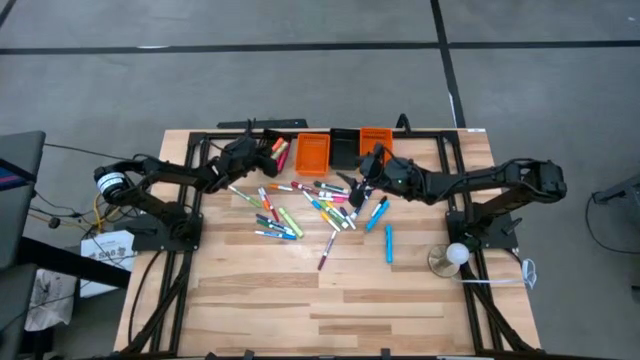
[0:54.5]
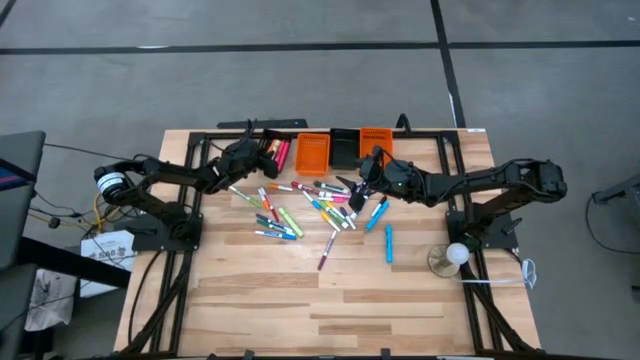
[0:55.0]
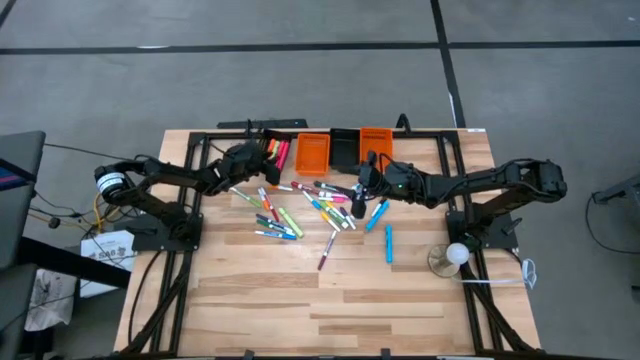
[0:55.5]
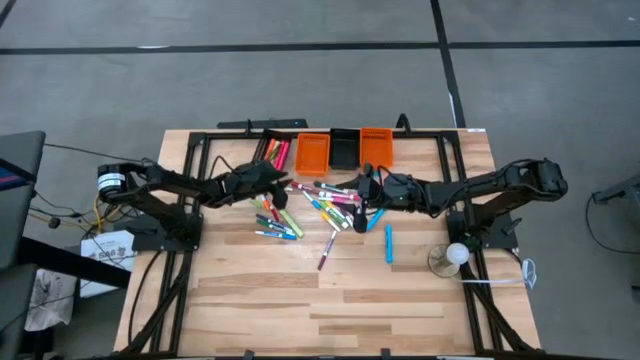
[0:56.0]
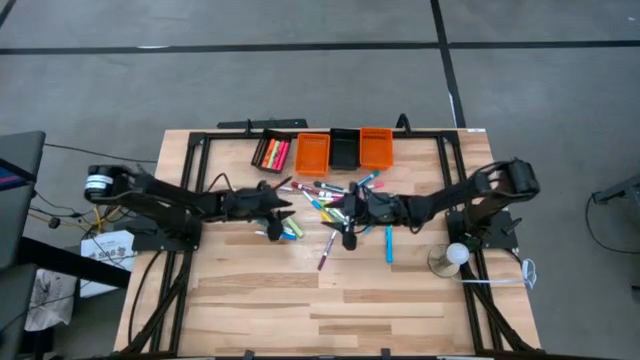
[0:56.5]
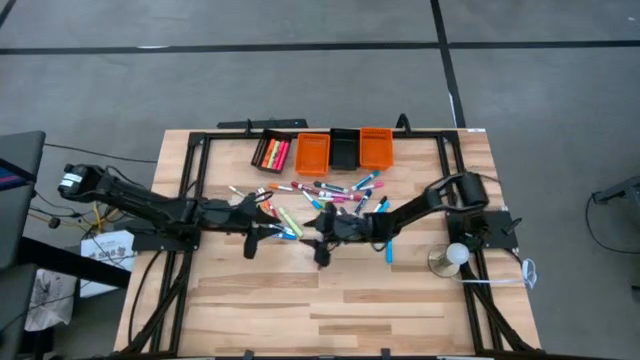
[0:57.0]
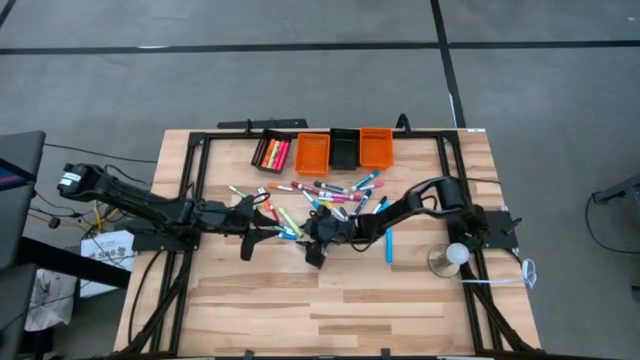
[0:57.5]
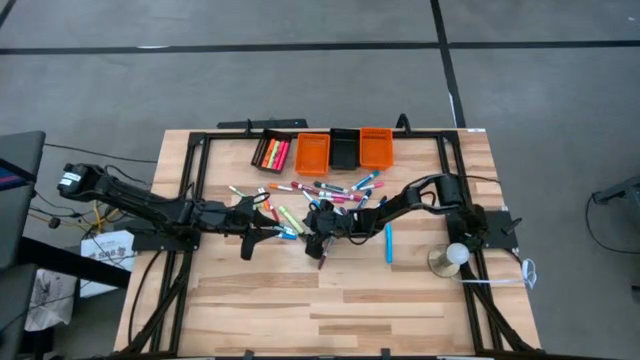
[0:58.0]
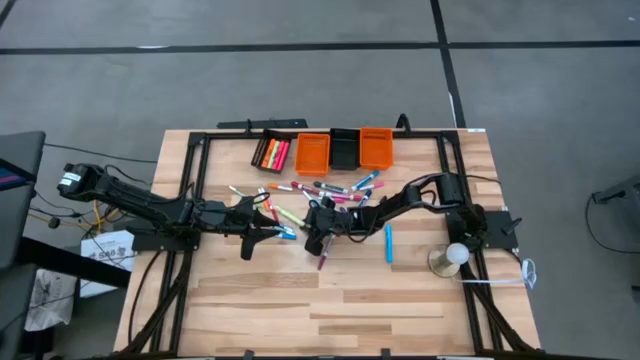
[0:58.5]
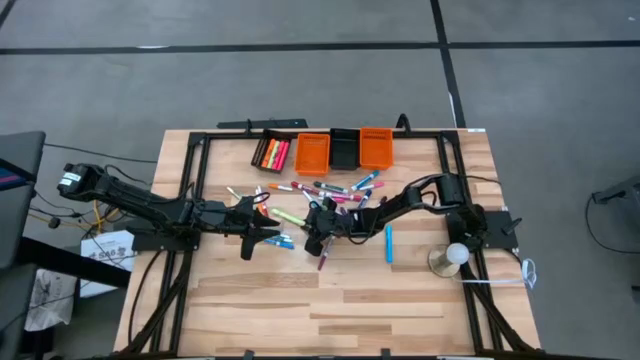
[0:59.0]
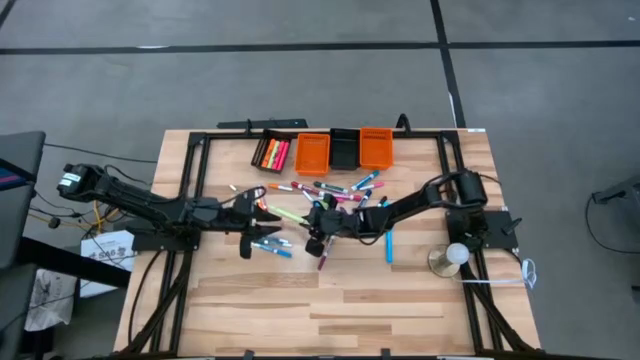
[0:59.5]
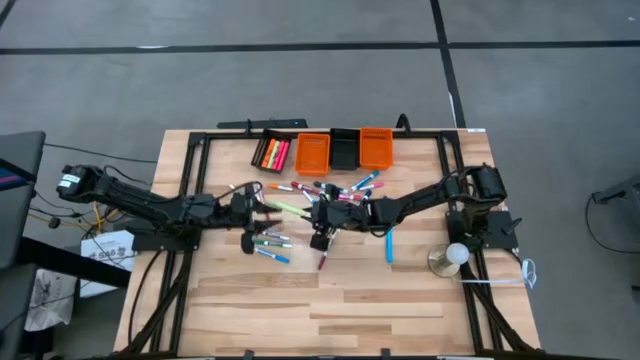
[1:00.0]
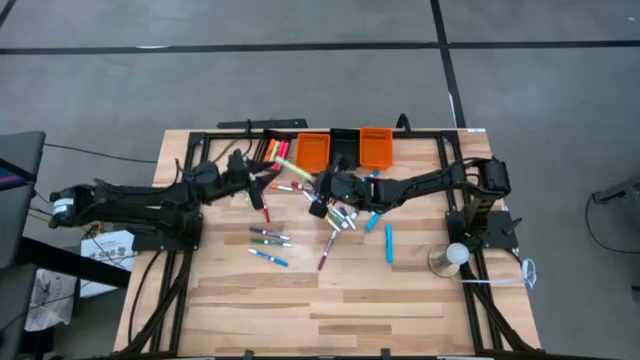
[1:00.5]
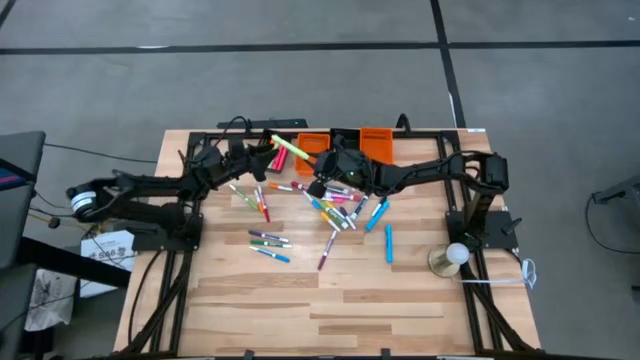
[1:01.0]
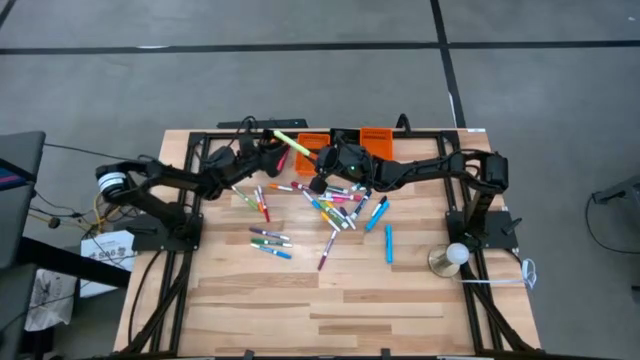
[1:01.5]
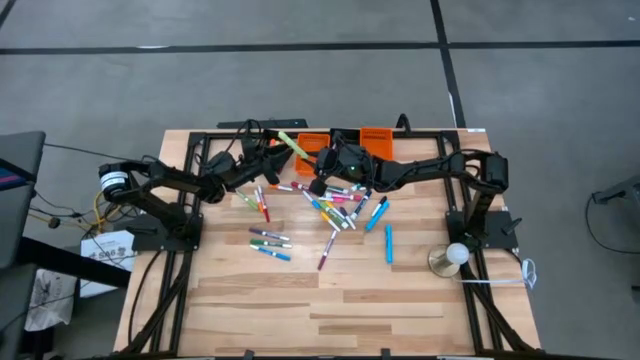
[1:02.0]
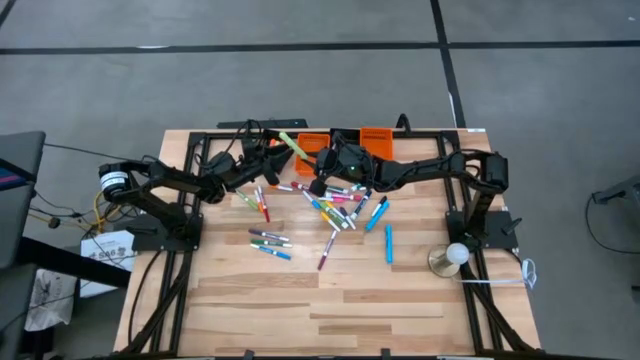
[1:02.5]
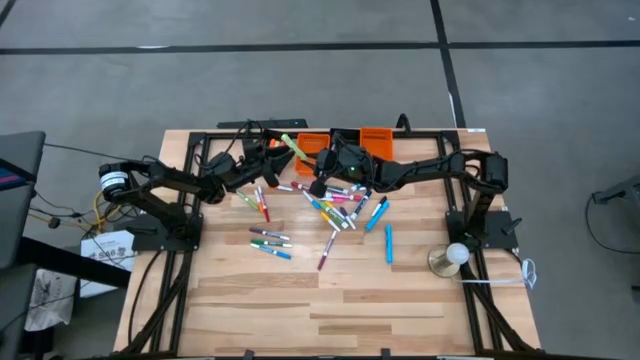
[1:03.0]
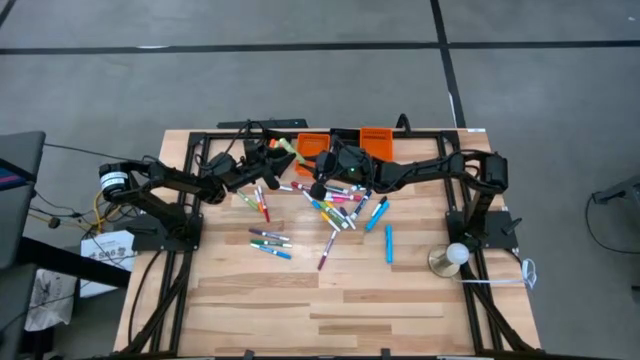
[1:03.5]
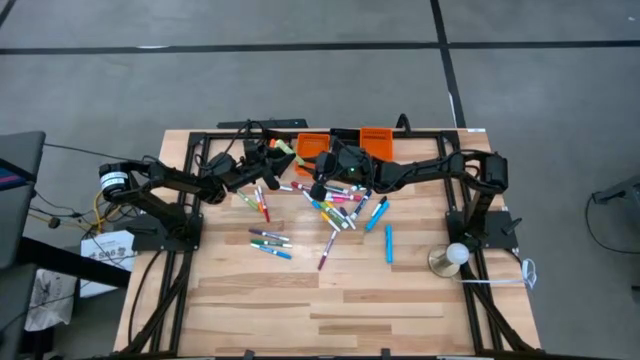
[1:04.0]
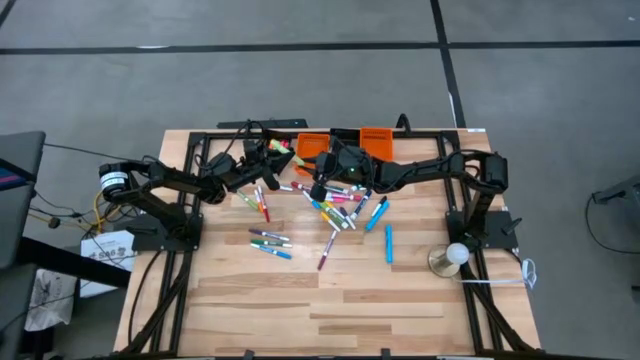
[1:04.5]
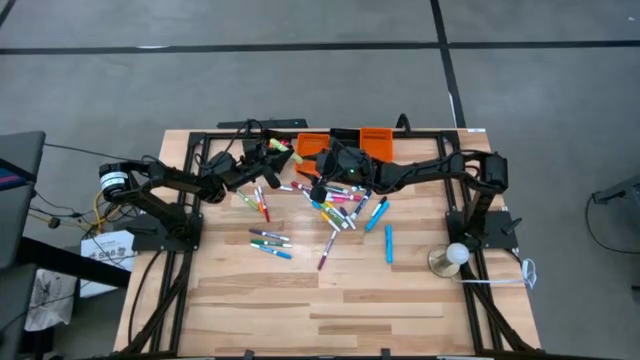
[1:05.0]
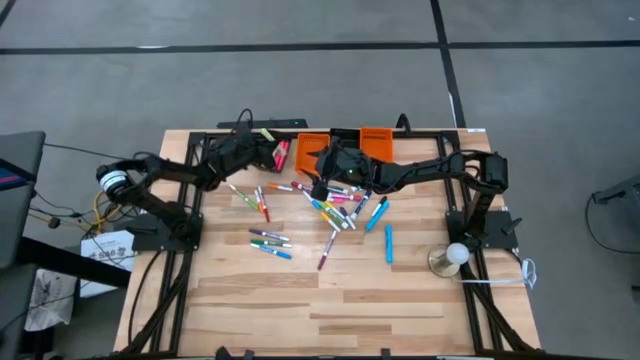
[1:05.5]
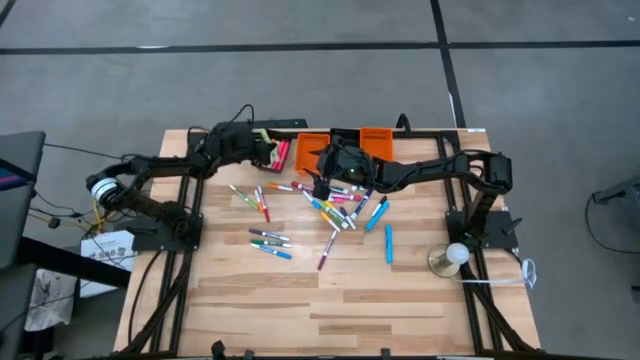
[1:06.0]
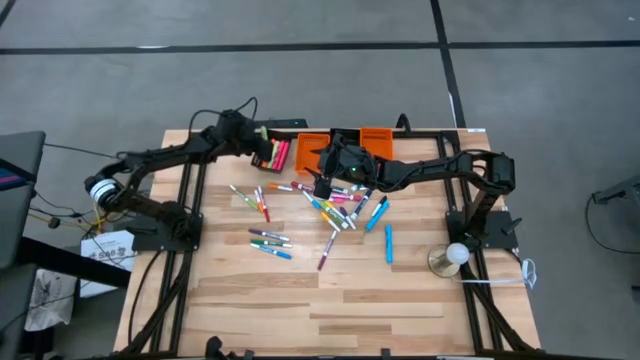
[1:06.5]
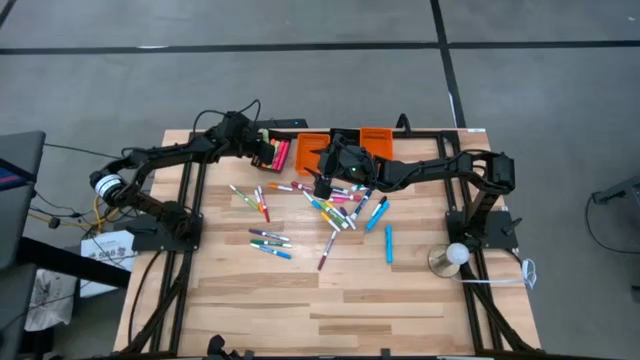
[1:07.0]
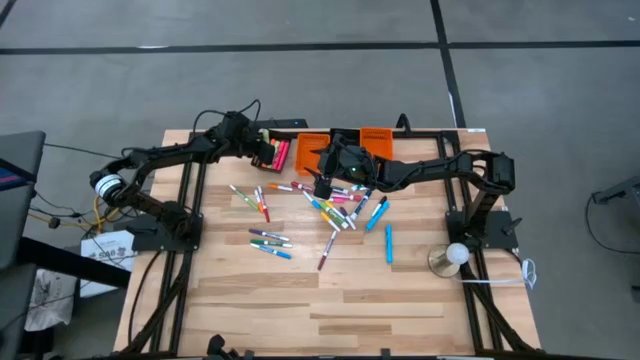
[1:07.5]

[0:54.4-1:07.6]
Task: Pick & Place Markers
Put the big green highlighter pen into the left black basket

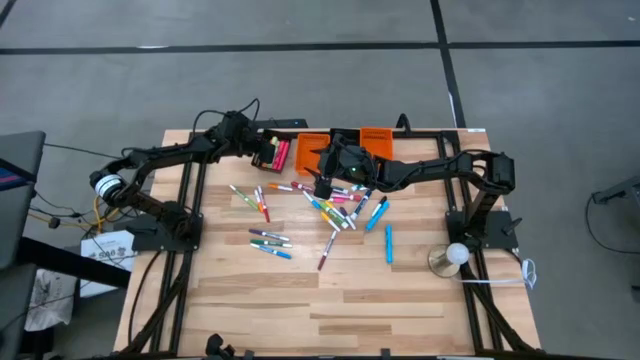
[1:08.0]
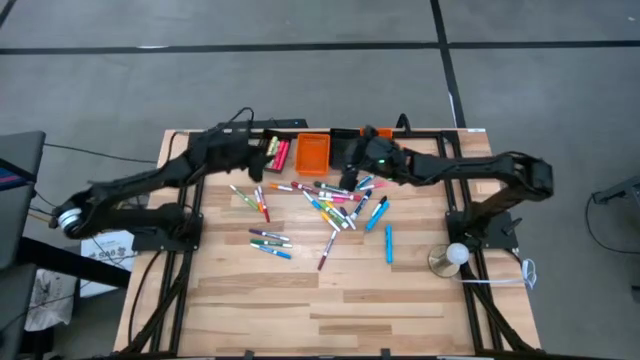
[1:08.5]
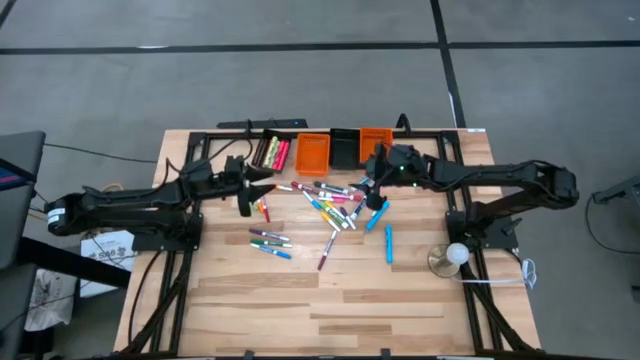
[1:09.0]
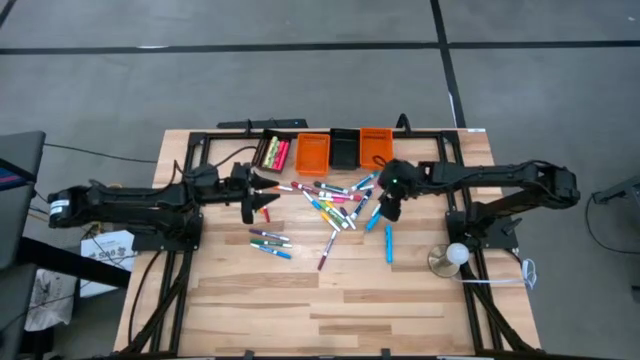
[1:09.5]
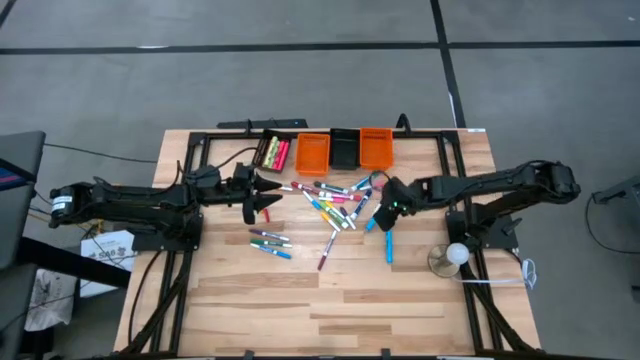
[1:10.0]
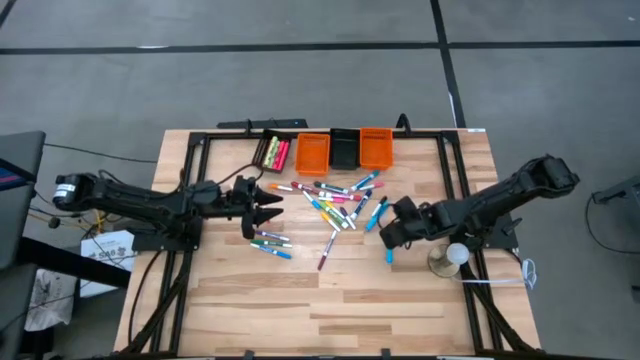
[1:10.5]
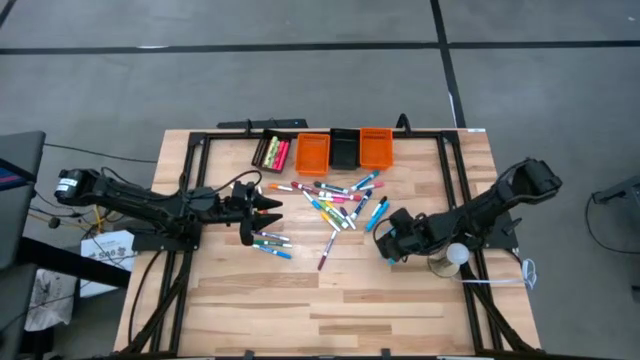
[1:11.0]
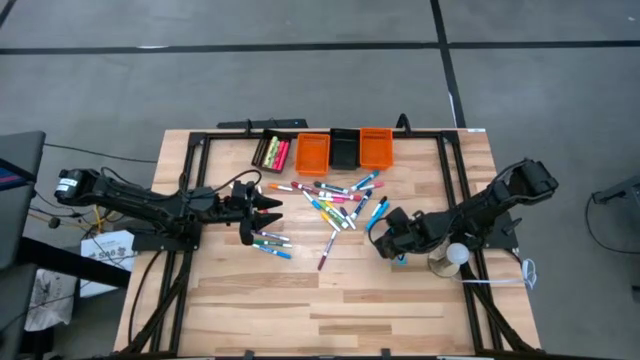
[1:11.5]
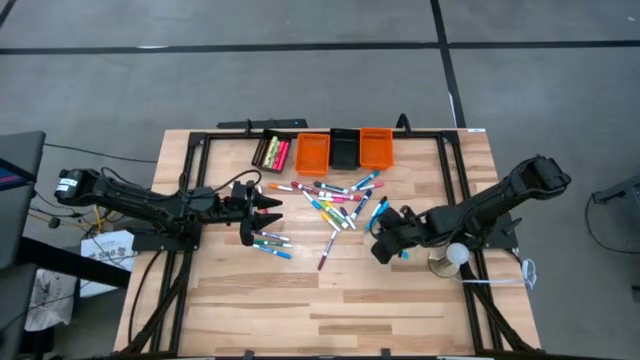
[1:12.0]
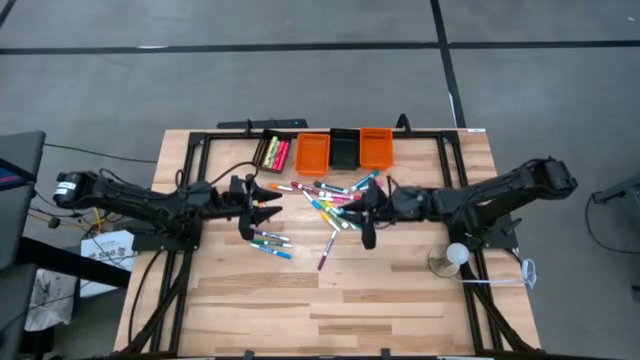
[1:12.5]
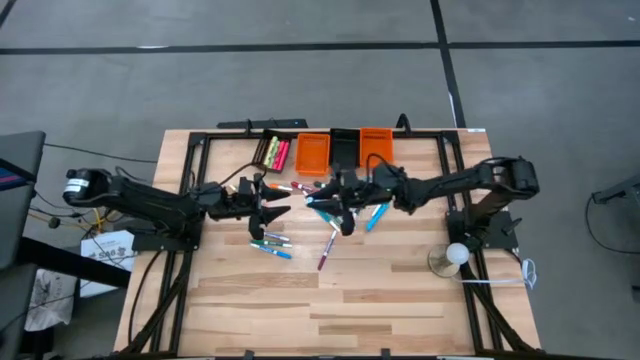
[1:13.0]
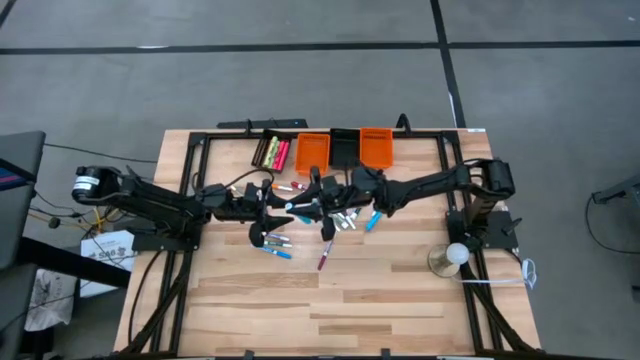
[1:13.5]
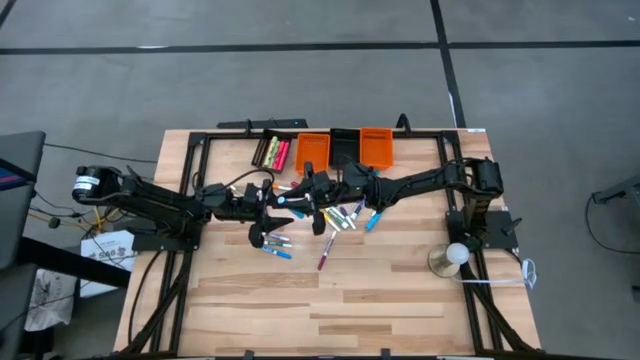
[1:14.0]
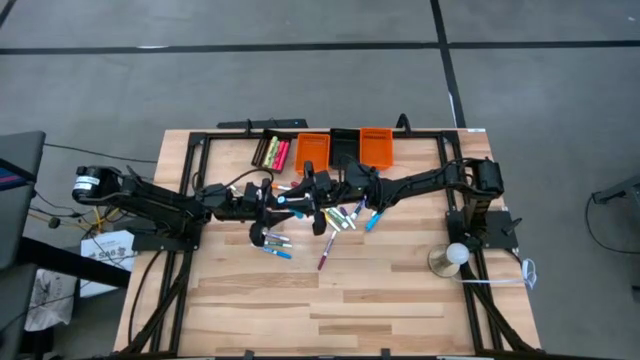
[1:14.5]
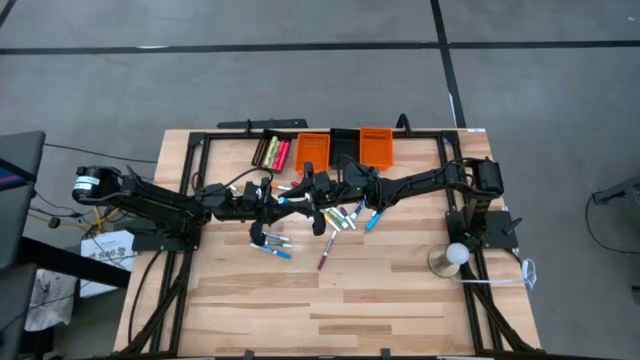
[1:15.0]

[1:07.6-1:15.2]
Put the bottom big blue highlighter pen into the left black basket
